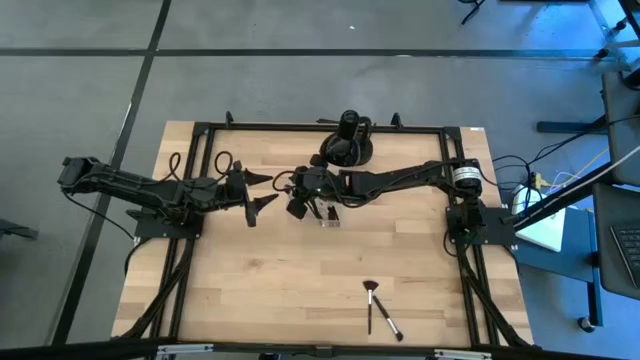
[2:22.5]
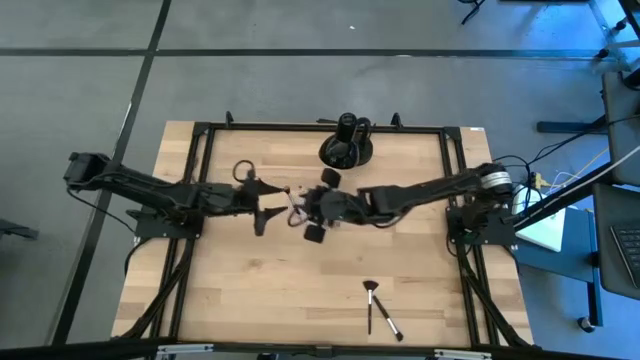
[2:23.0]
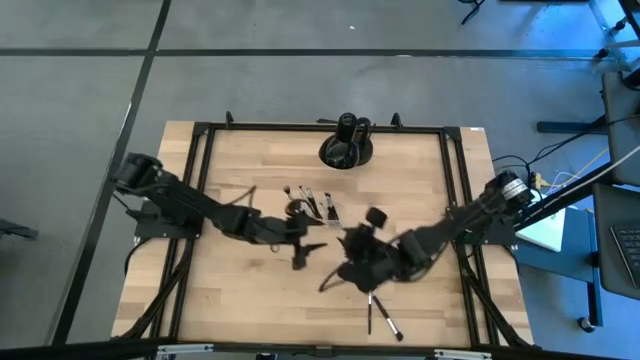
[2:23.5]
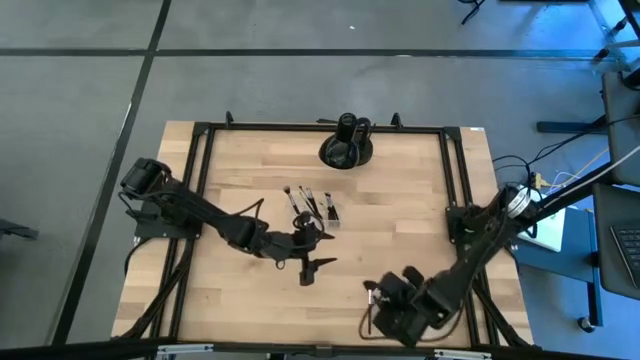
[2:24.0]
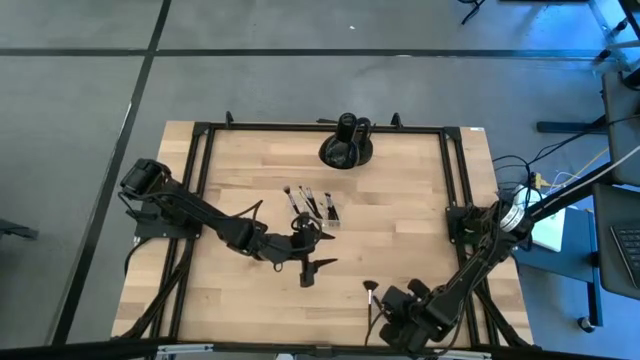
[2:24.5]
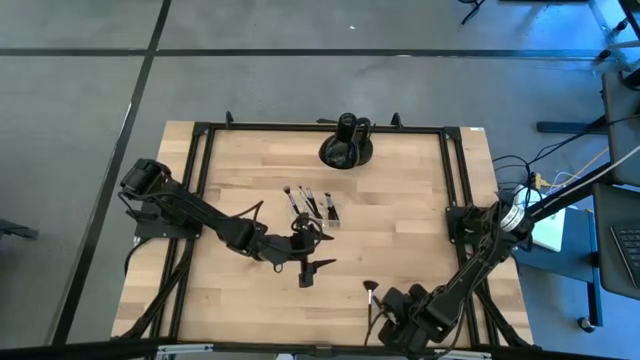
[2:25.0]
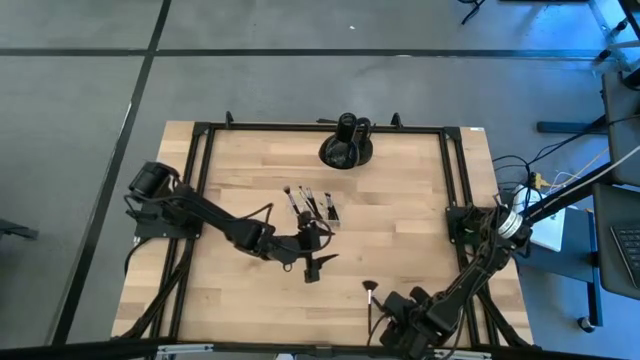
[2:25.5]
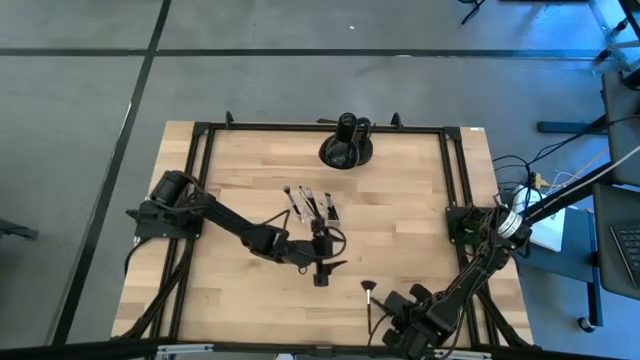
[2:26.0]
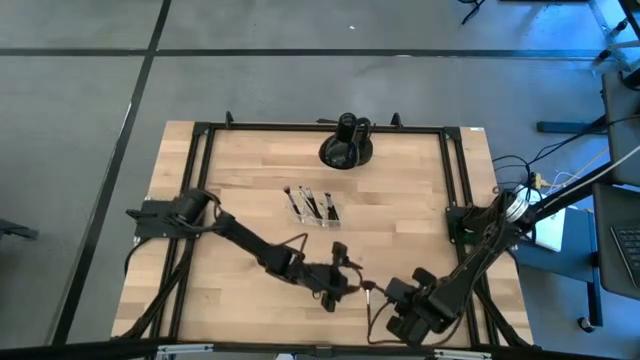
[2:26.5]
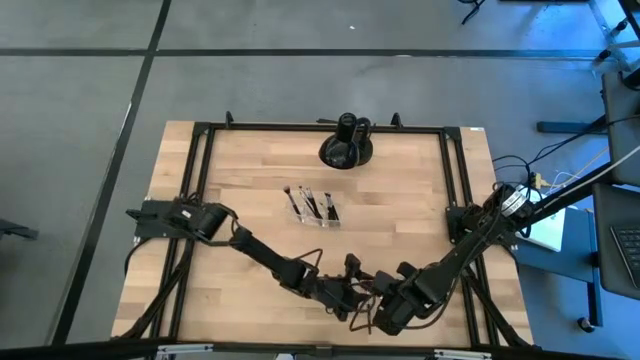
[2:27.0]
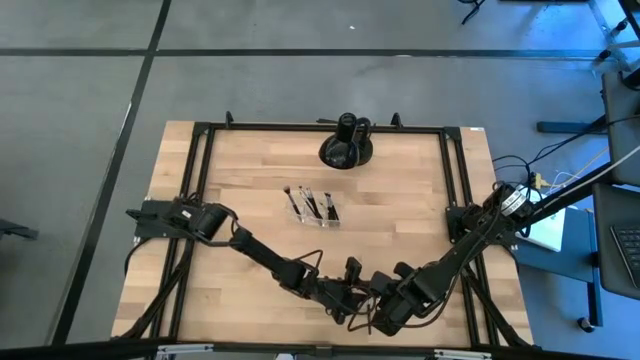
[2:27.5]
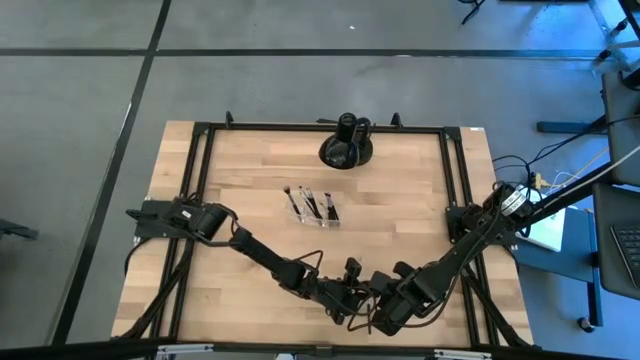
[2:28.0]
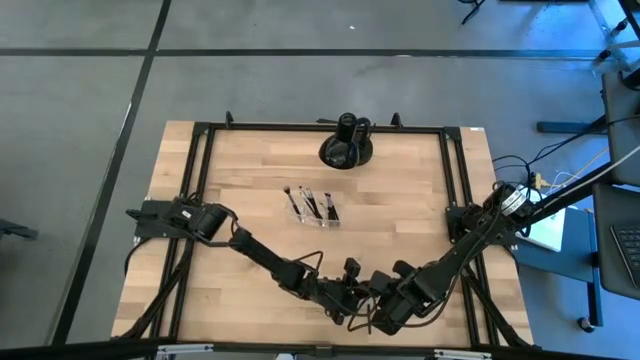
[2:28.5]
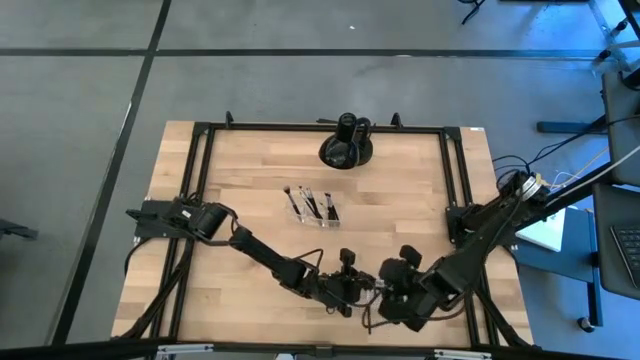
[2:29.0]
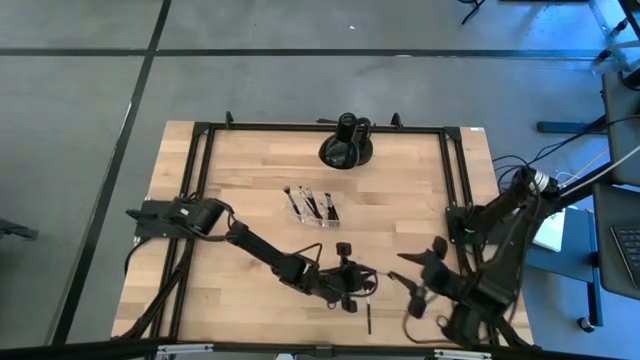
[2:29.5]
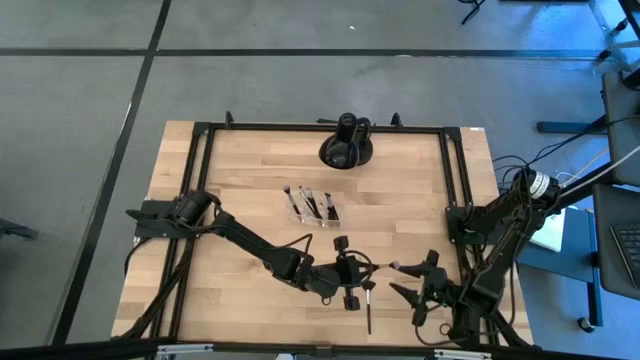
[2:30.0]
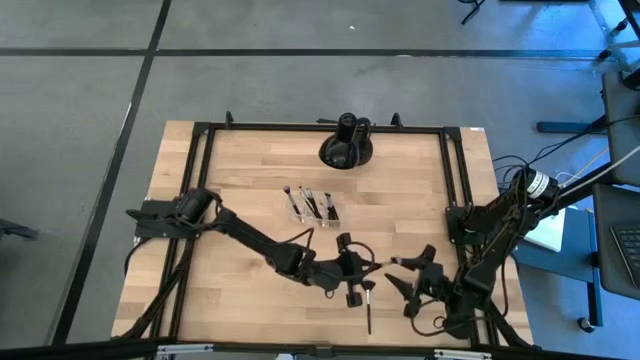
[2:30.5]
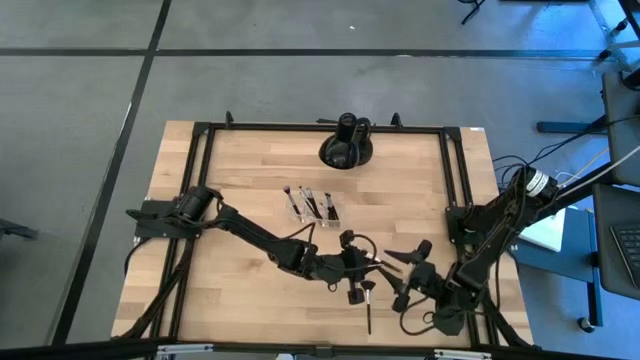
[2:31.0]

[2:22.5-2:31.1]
Task: Pick & Place Makeup Supplies
Put the makeup brush into the transparent organizer

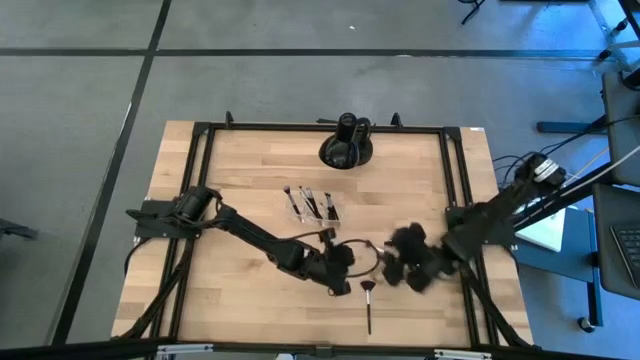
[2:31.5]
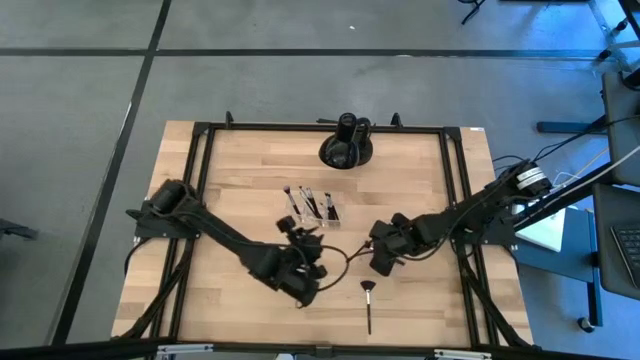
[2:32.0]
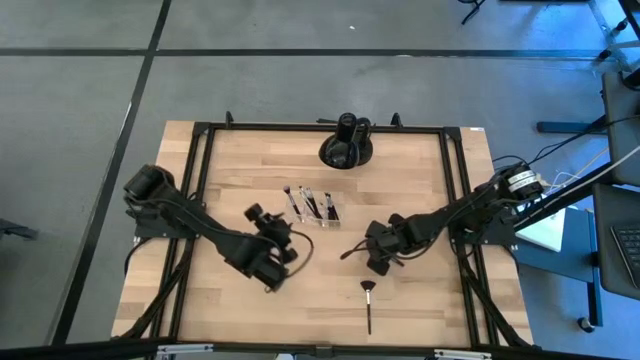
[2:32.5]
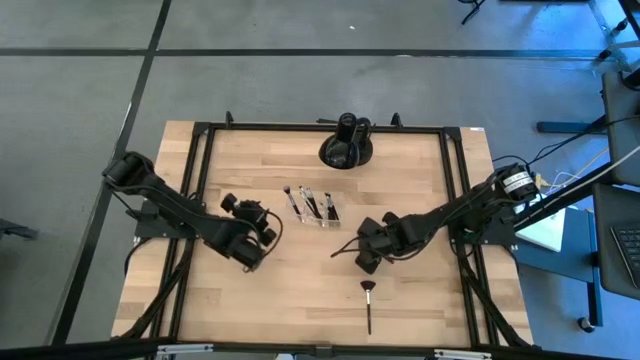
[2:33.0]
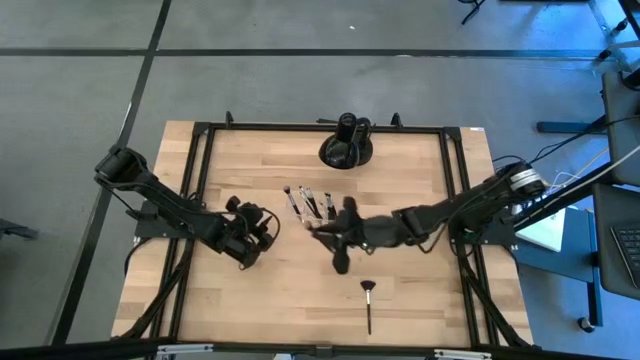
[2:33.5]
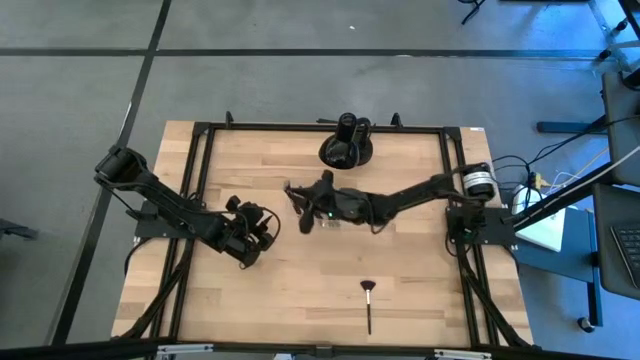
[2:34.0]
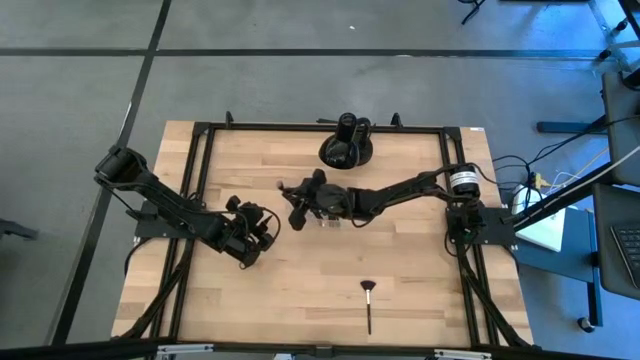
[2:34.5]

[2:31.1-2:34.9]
Put the makeup brush into the transparent organizer

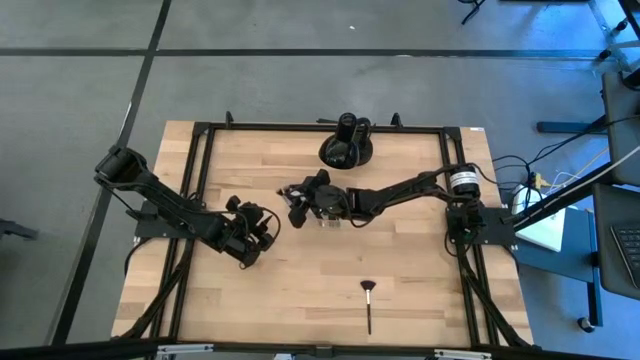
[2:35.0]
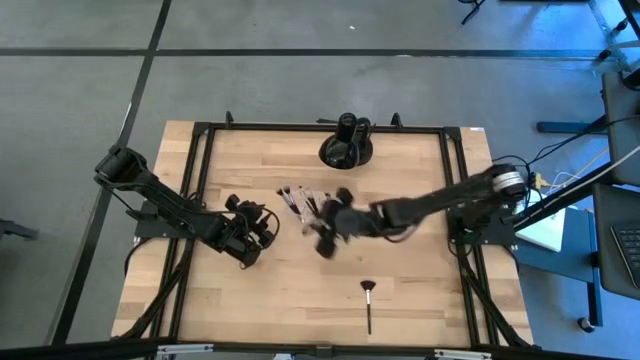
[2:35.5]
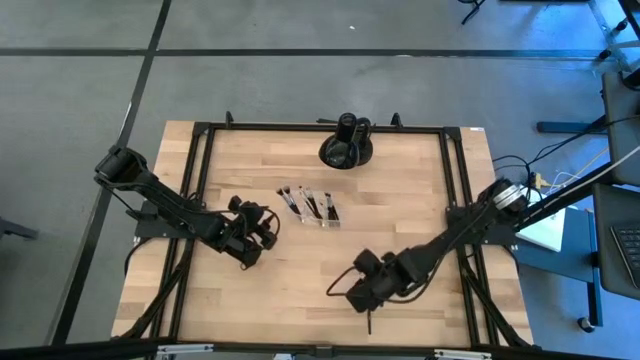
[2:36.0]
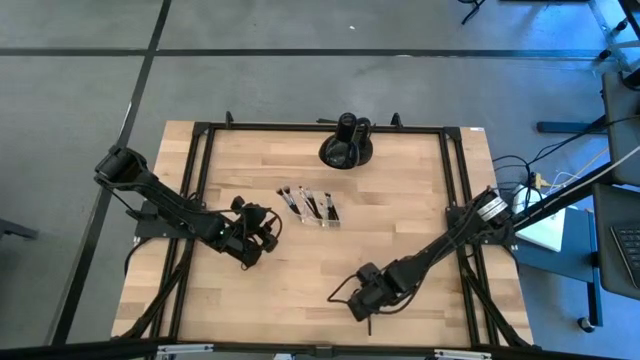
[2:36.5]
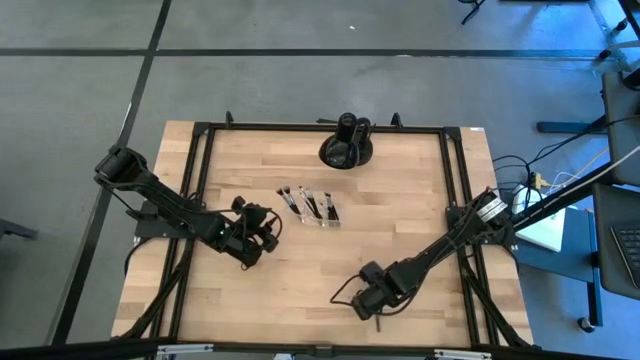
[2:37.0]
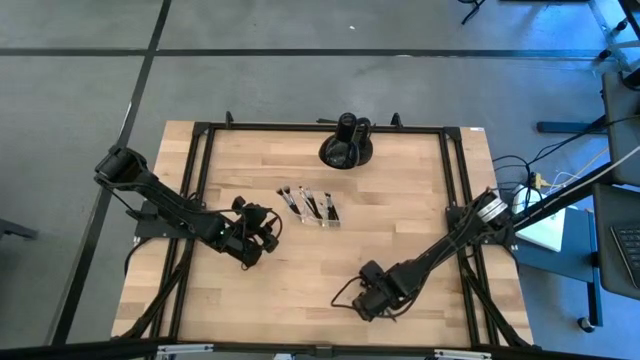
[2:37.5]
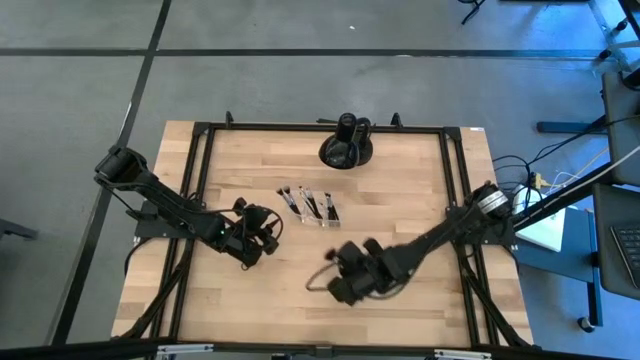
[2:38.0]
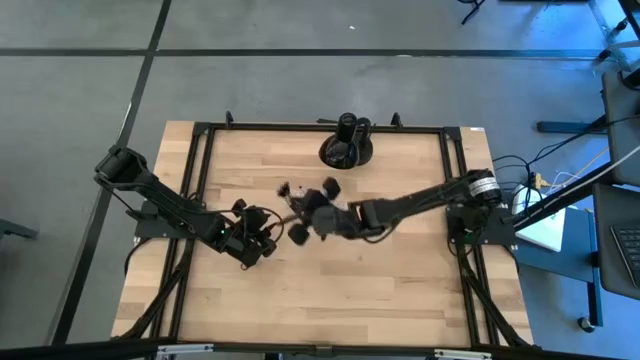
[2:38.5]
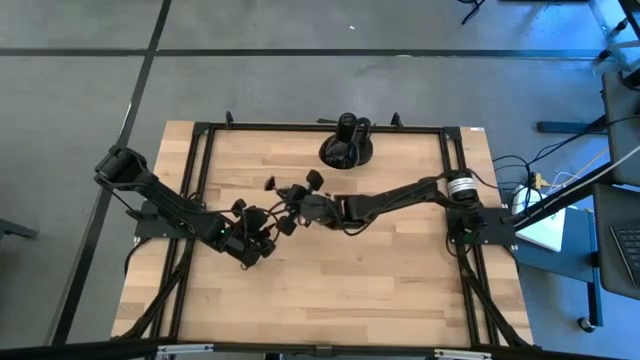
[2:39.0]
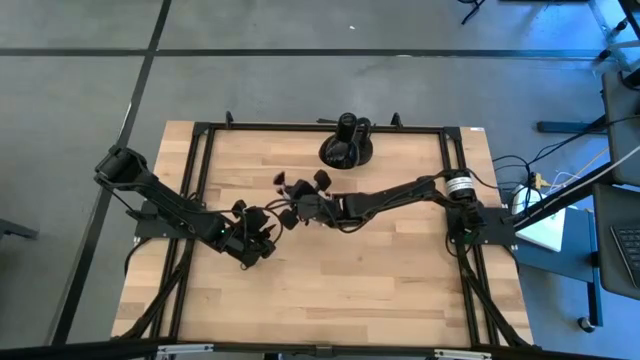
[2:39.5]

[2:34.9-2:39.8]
Put the makeup brush into the transparent organizer

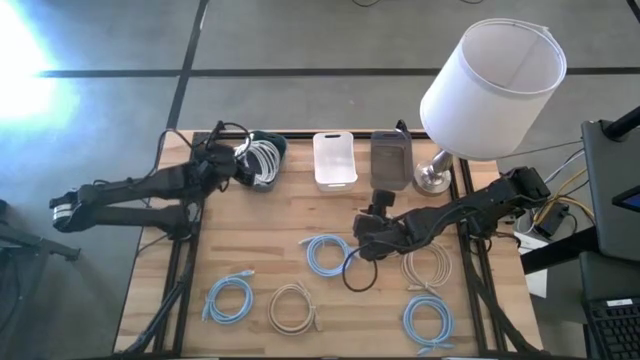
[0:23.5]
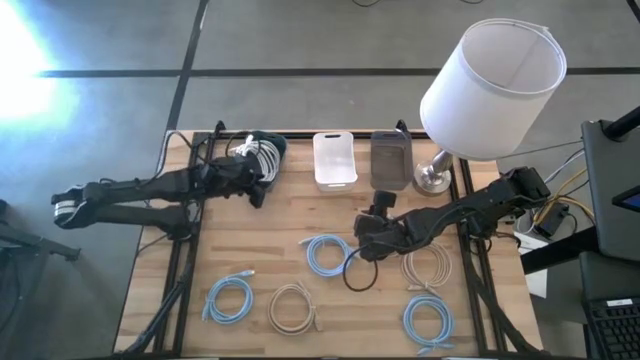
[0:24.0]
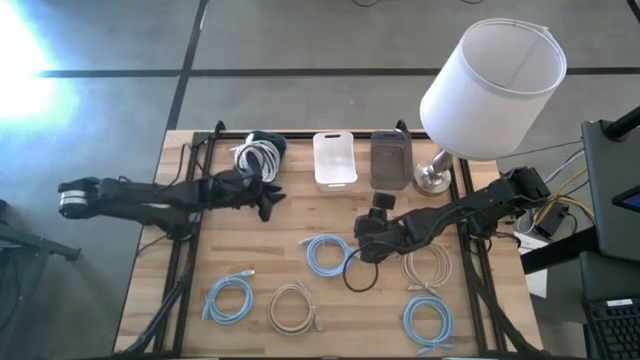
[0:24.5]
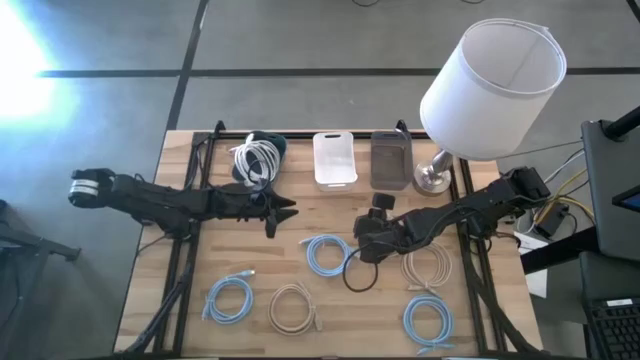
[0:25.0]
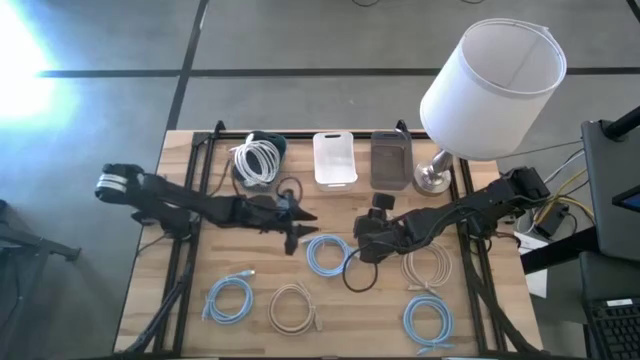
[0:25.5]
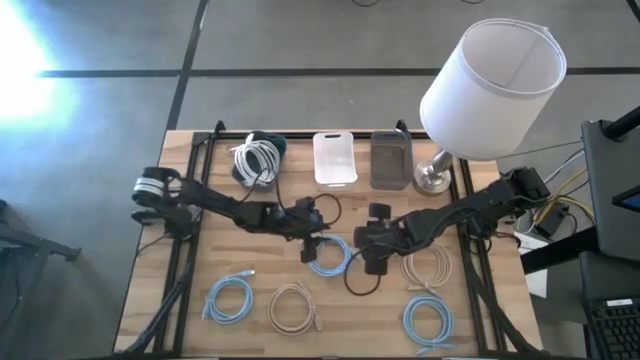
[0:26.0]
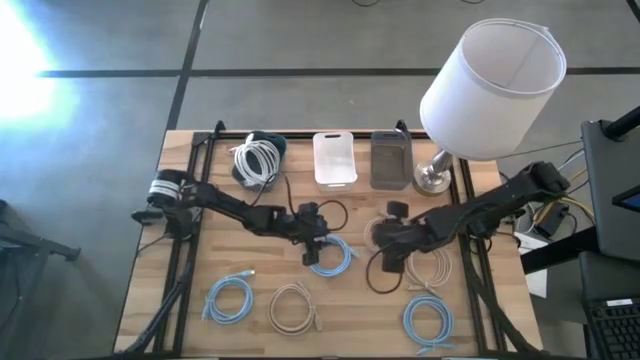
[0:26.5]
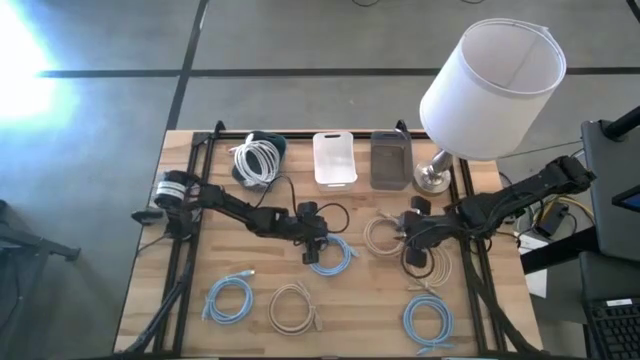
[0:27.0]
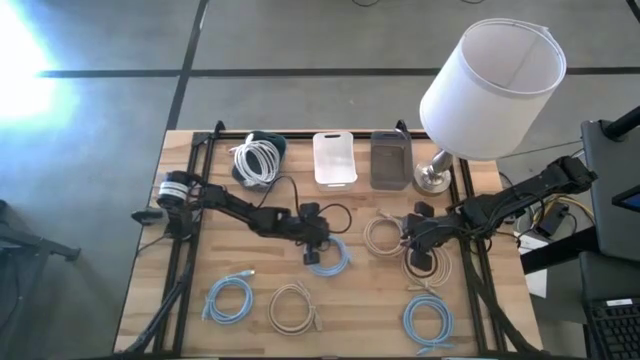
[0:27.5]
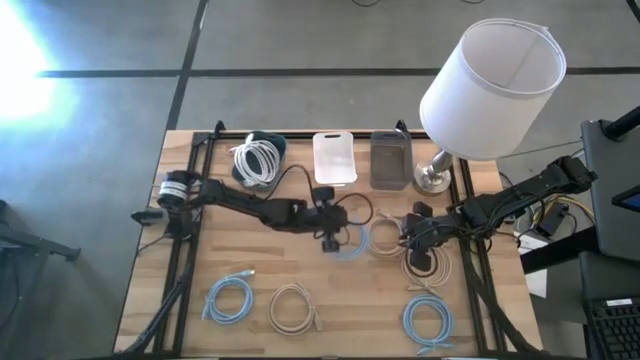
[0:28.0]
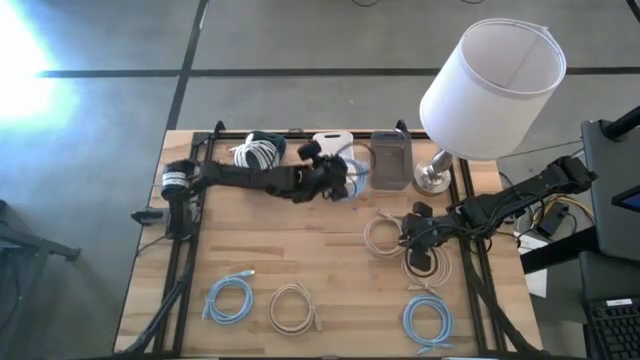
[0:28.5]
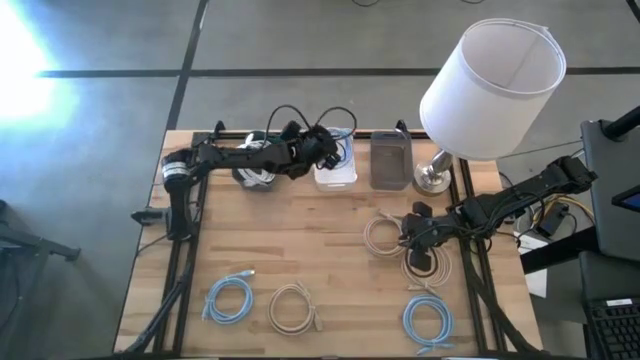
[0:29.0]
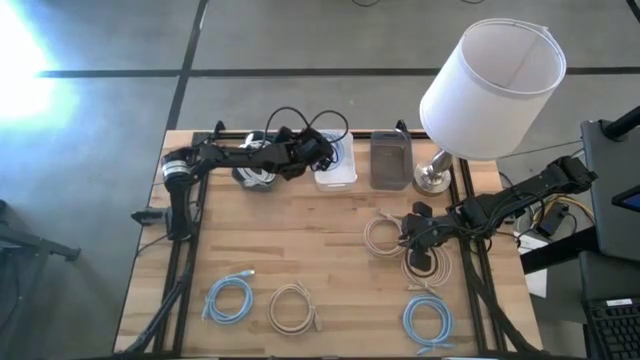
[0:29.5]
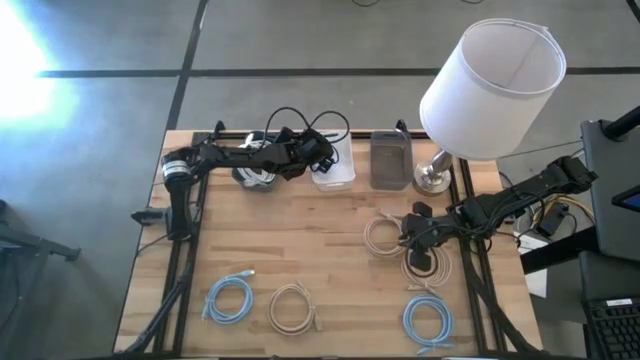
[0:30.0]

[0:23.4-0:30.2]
Task: Sort HDMI cables
Put the top blue HDMI cable into the white bin
